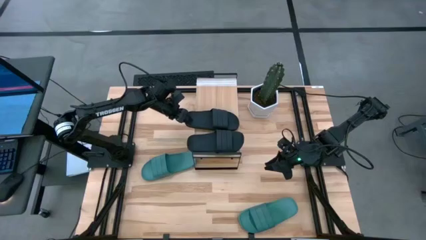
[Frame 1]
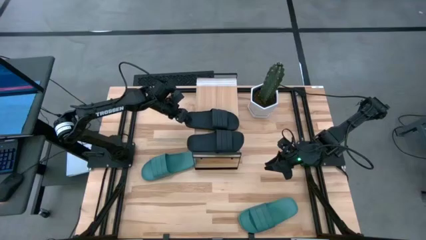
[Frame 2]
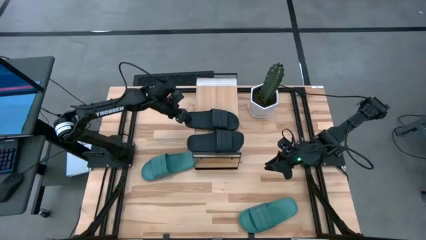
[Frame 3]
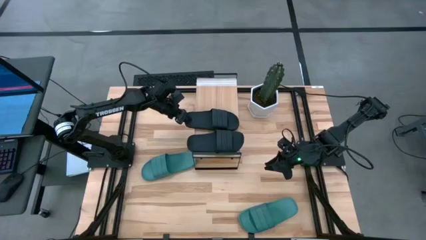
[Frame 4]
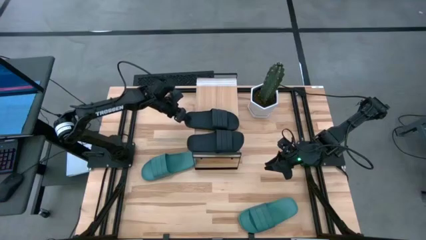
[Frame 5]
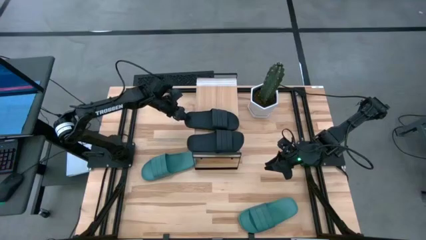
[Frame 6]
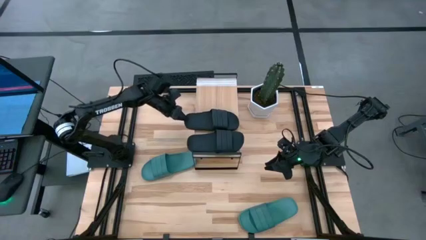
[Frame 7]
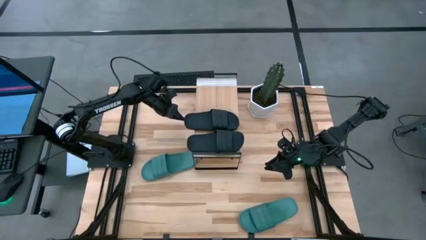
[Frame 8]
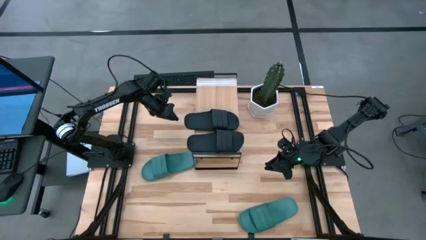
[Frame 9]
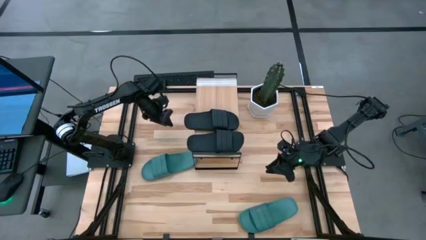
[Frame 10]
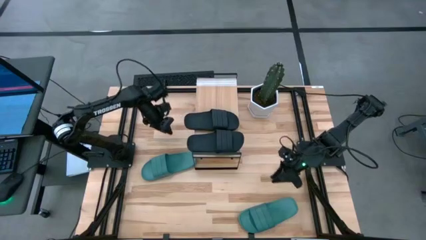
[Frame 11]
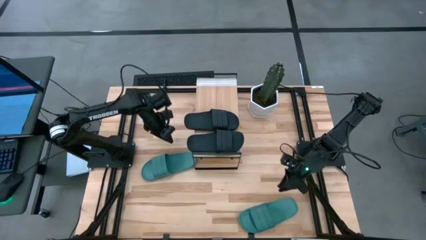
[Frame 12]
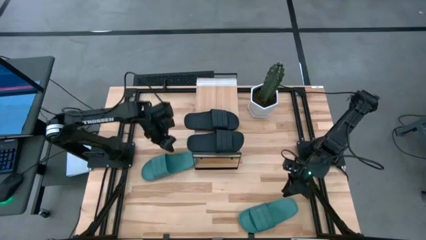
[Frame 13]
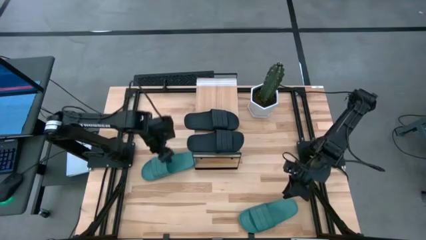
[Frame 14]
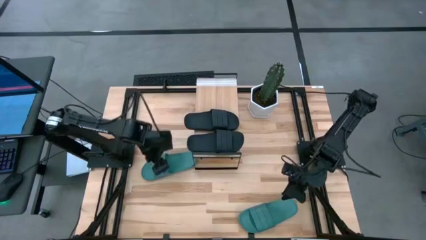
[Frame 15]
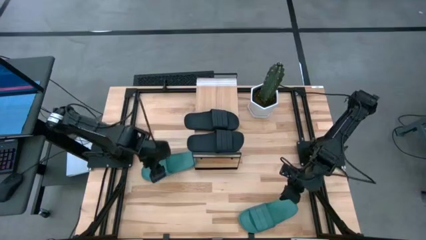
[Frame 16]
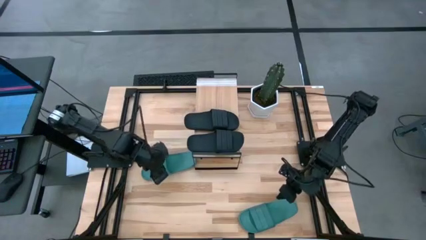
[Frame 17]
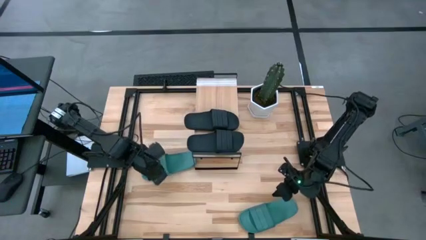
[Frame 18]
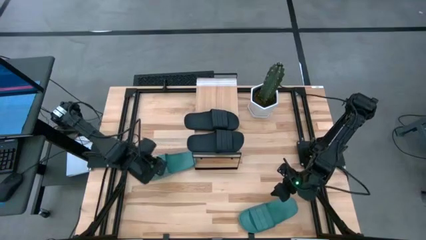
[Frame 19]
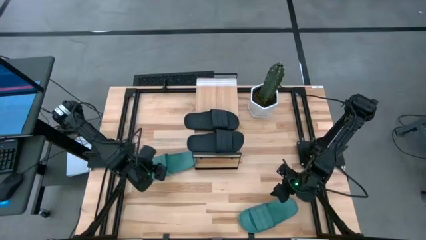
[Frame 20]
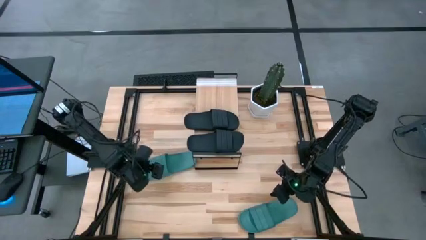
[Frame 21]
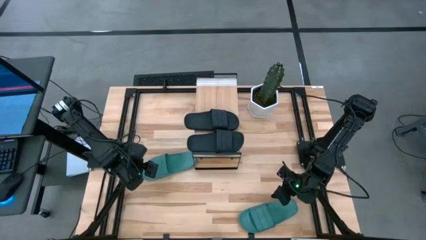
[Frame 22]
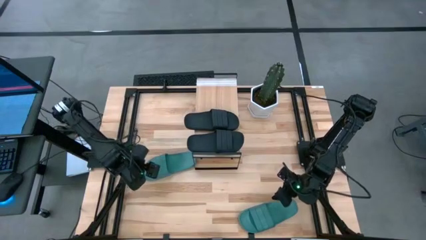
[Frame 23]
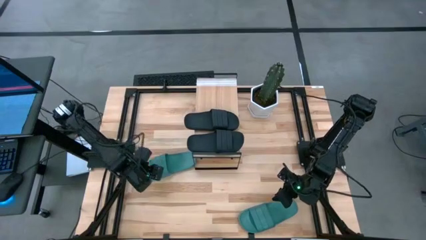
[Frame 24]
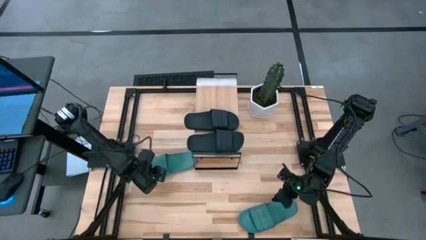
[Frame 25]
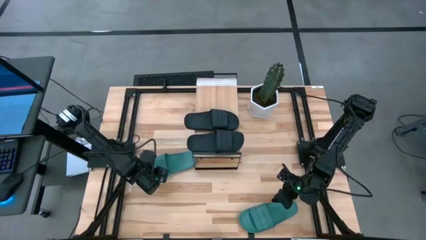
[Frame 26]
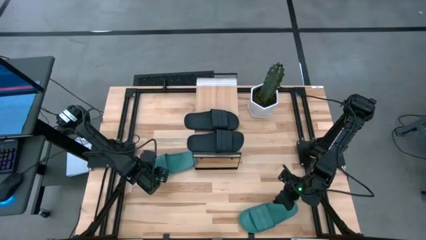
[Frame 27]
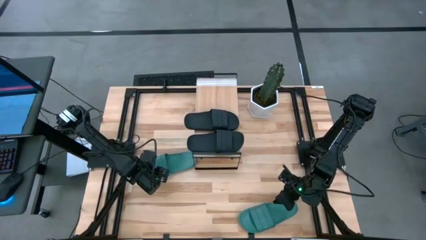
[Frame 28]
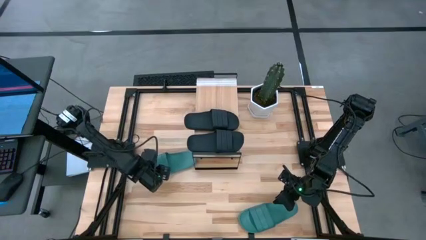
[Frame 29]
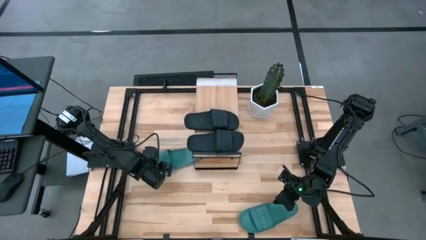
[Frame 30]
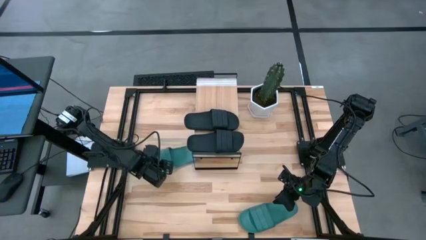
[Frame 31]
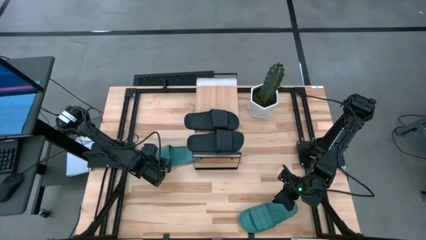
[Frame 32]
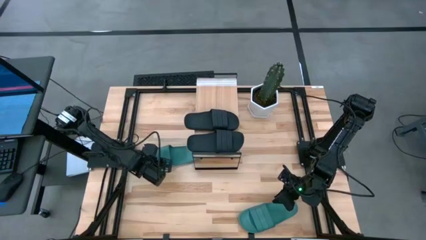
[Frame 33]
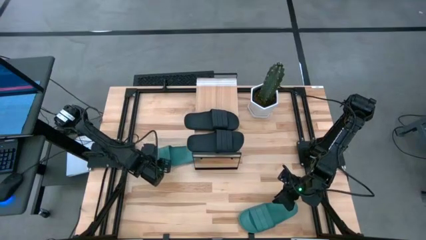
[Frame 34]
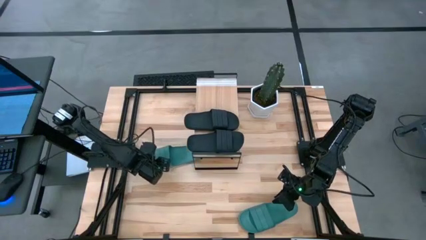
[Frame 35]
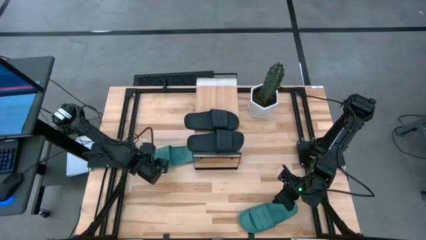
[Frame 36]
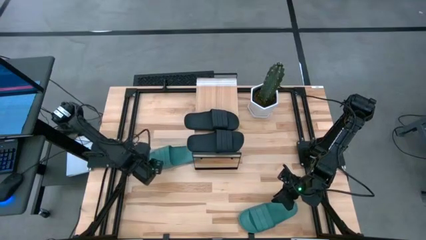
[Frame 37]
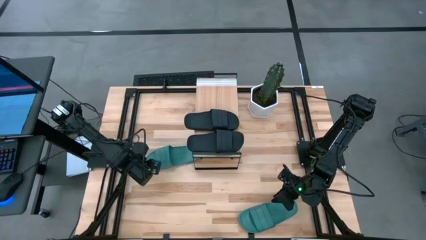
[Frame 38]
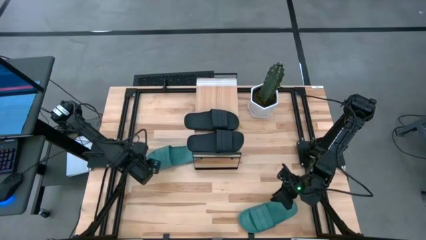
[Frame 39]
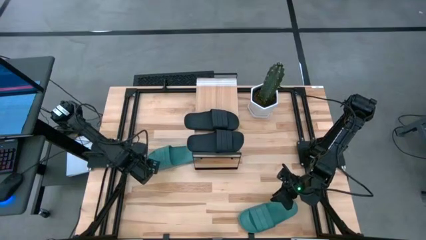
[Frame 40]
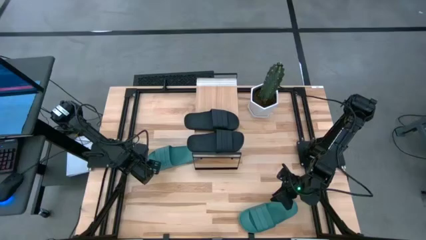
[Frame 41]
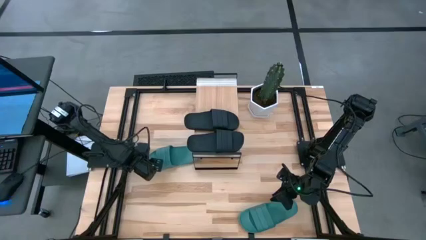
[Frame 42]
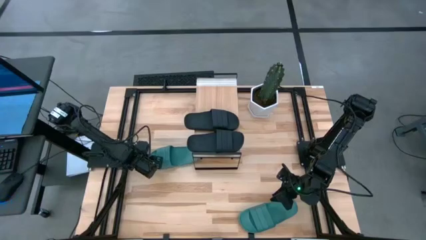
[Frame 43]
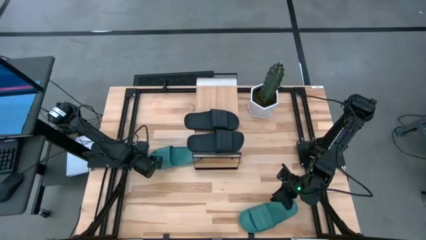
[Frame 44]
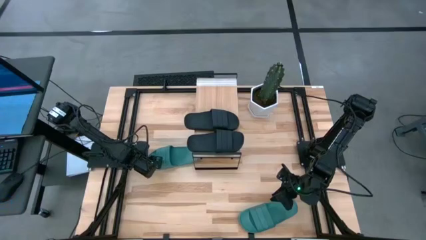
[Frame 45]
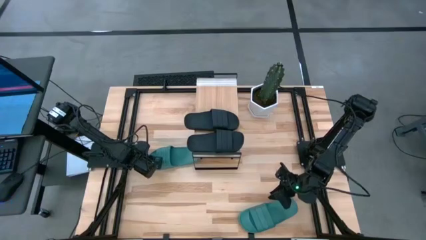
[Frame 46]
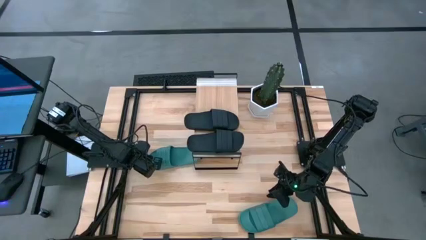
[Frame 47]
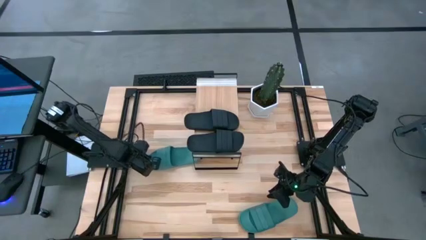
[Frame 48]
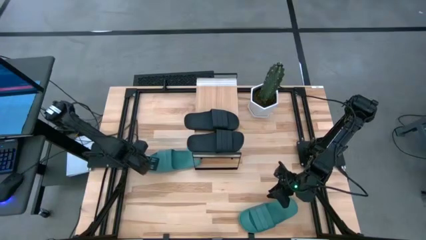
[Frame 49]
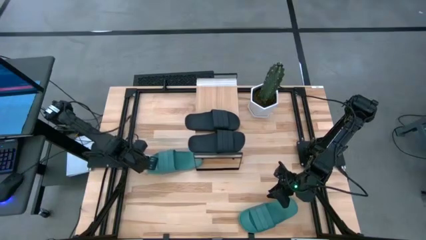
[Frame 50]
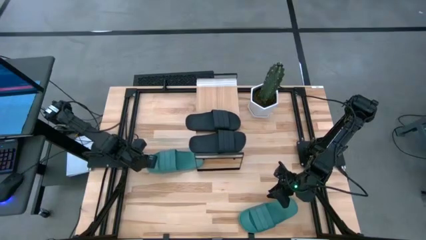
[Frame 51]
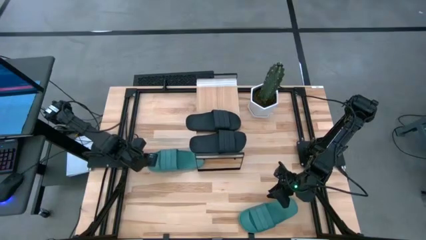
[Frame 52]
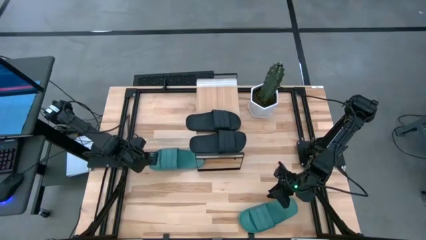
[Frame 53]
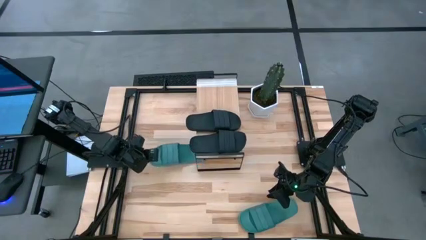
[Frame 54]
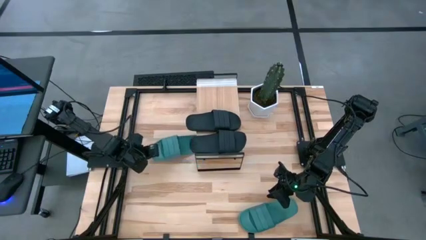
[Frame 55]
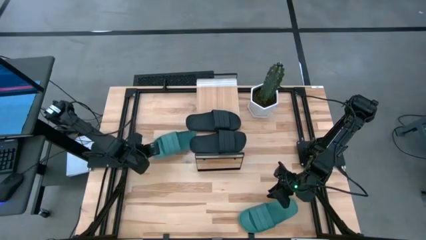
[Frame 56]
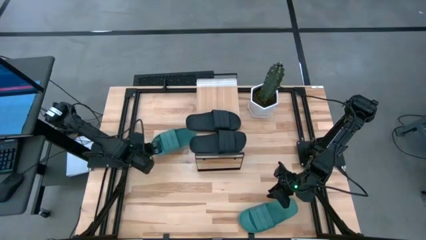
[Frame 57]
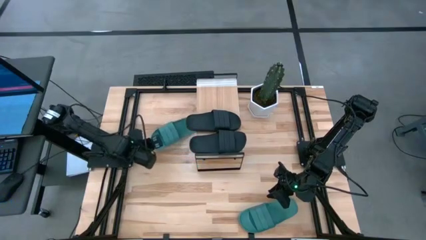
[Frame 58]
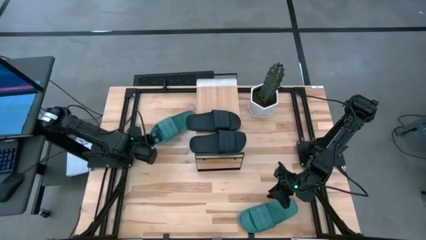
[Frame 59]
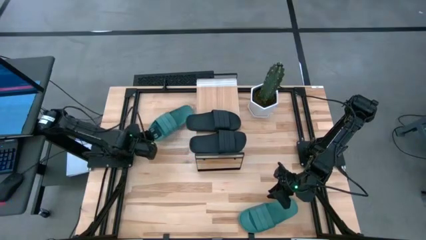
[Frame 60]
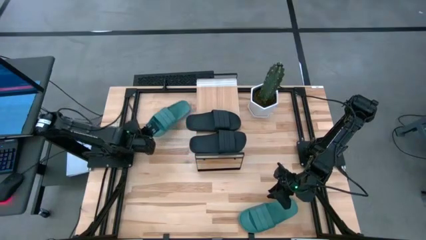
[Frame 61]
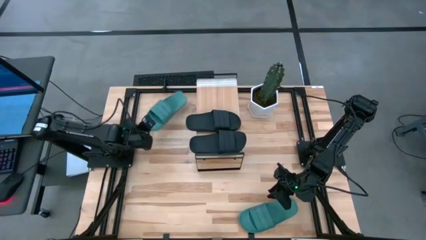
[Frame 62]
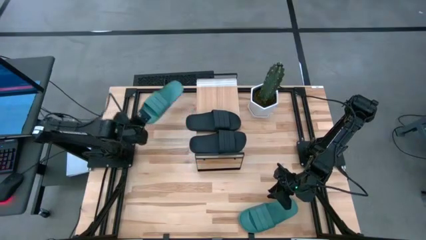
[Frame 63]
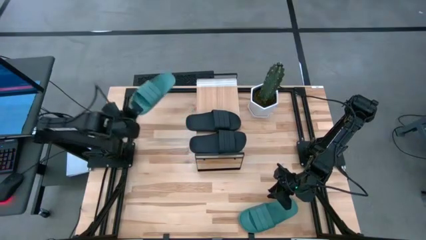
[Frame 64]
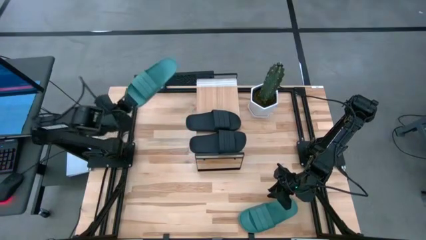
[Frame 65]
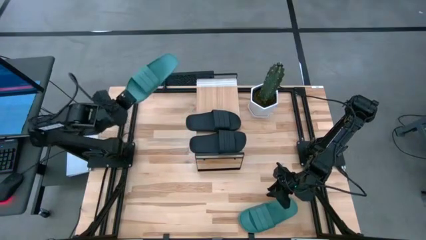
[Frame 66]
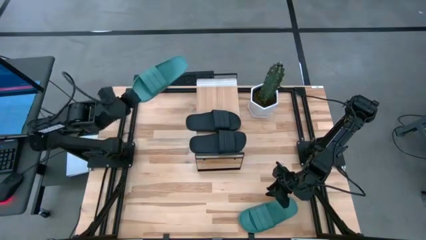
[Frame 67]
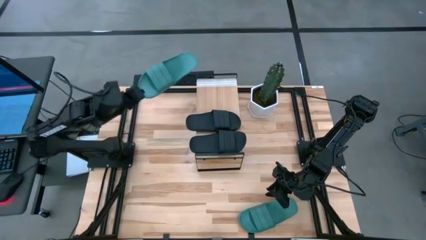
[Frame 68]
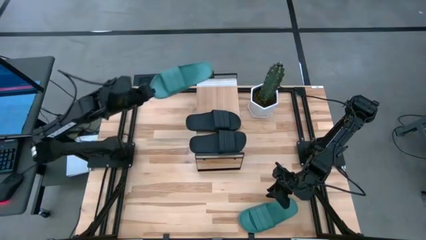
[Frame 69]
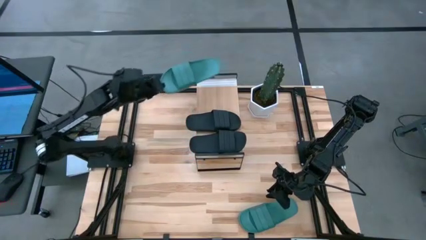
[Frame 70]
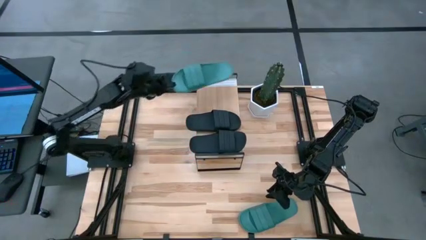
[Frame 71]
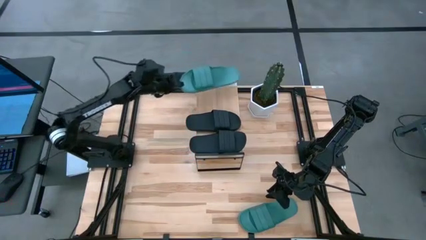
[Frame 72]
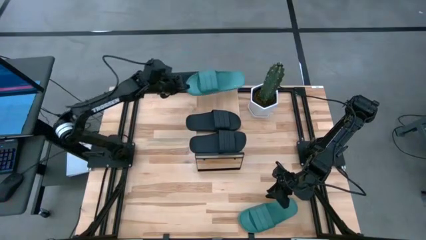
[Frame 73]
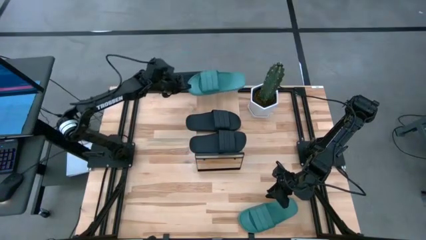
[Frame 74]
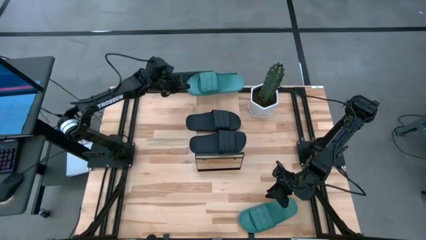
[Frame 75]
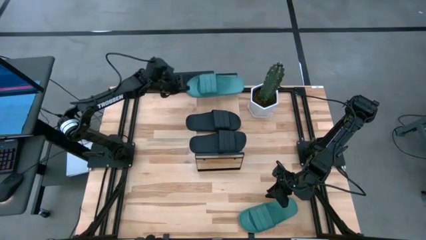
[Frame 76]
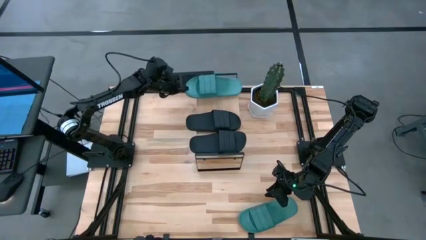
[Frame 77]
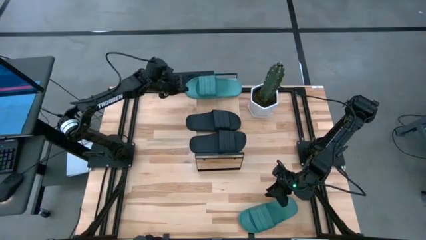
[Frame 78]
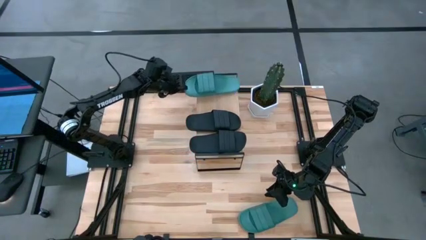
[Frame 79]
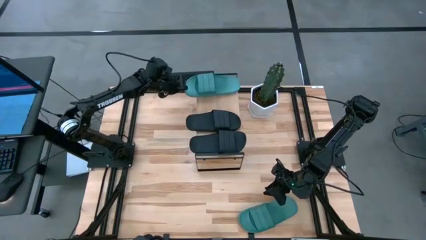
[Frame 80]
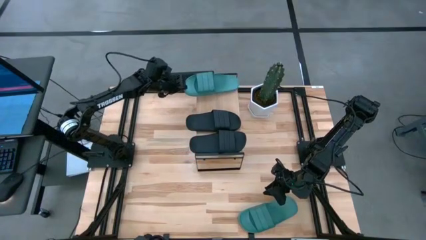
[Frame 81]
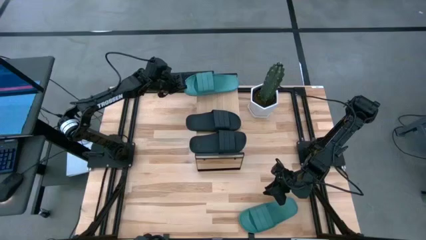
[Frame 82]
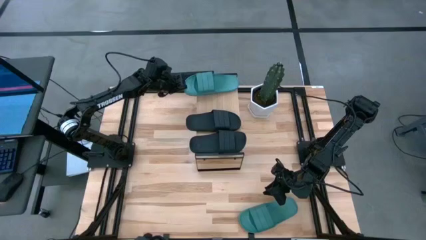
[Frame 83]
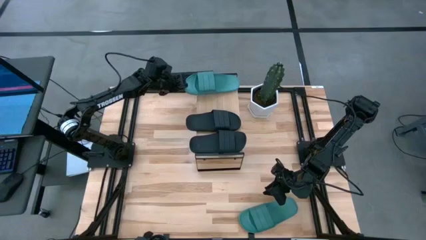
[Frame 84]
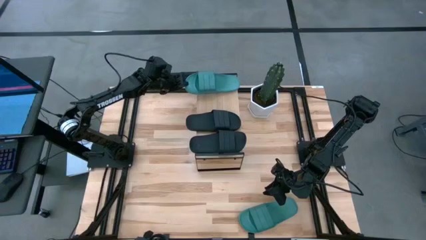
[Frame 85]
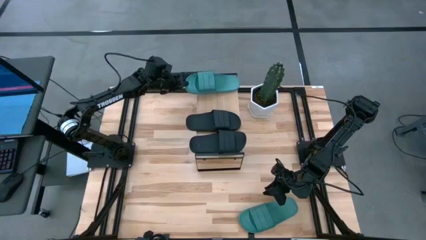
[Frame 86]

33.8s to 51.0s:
Task: Pick and place slides into the shelf
Put the left green slipper on the shelf
